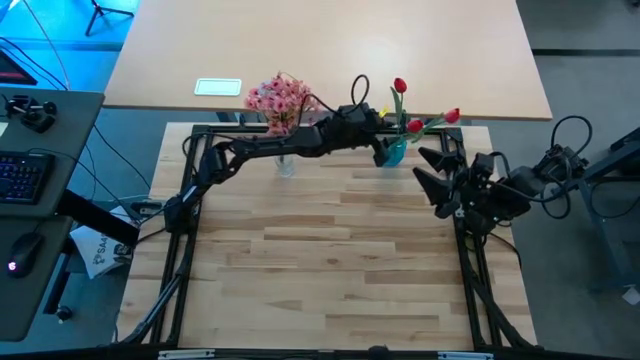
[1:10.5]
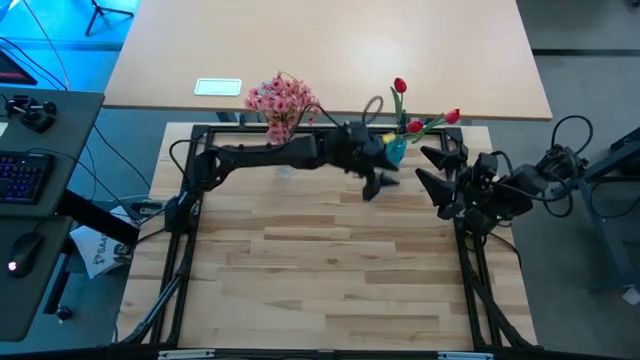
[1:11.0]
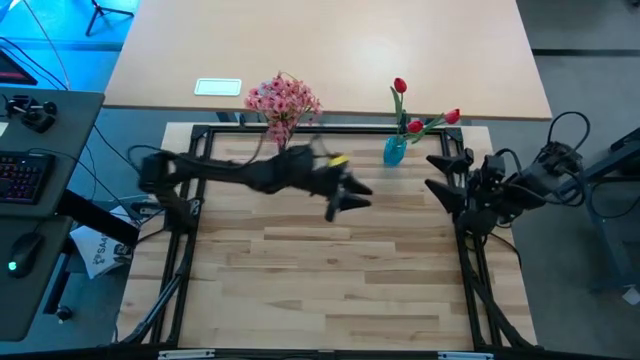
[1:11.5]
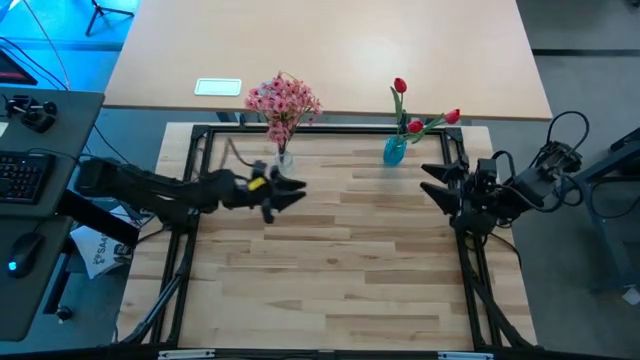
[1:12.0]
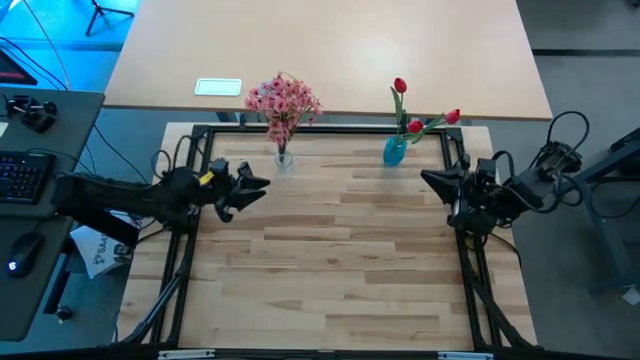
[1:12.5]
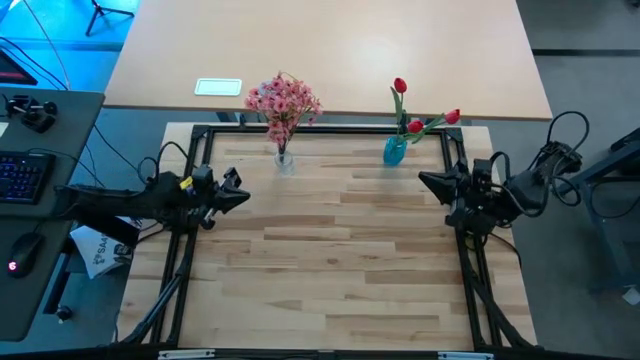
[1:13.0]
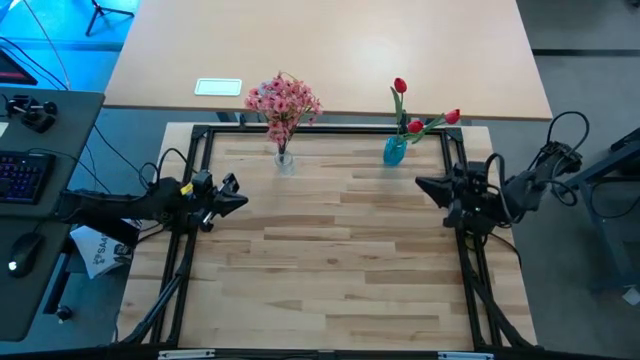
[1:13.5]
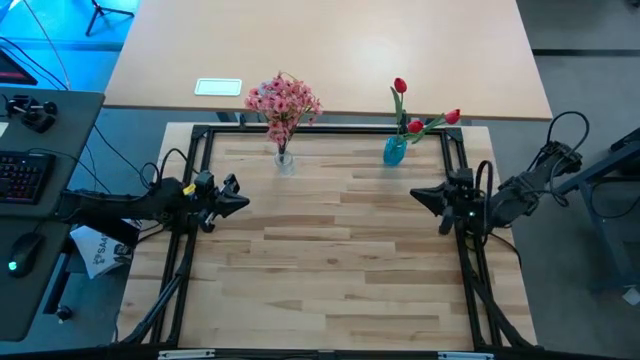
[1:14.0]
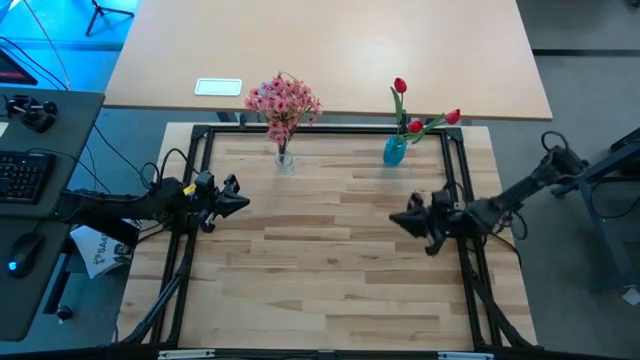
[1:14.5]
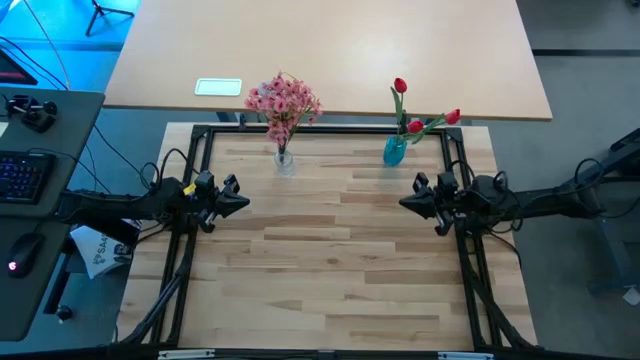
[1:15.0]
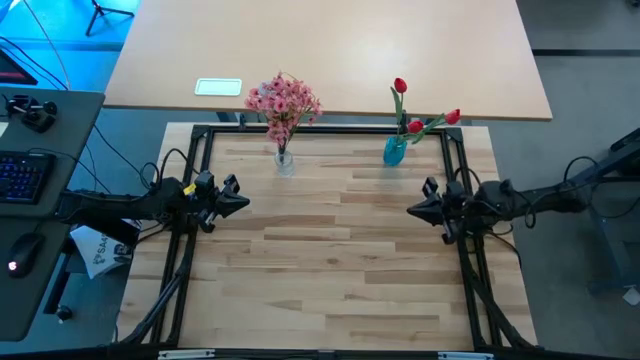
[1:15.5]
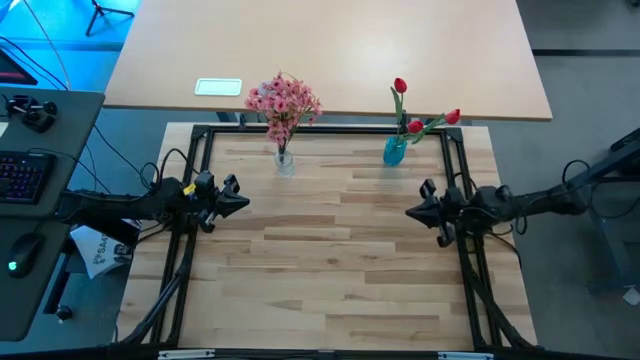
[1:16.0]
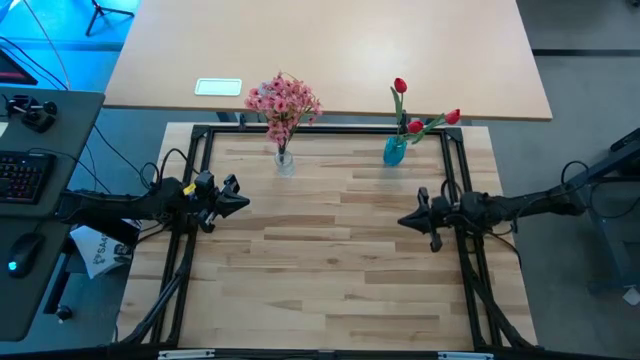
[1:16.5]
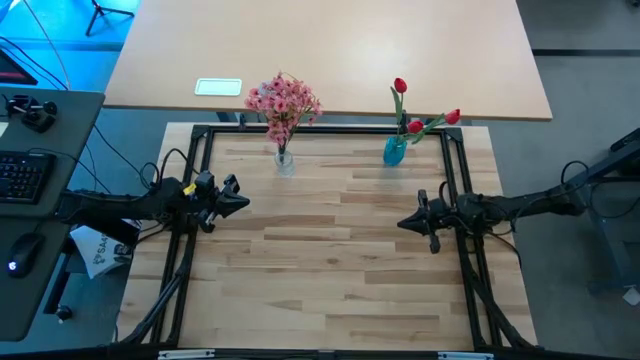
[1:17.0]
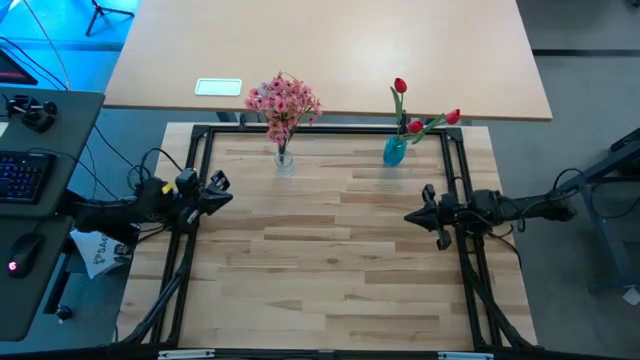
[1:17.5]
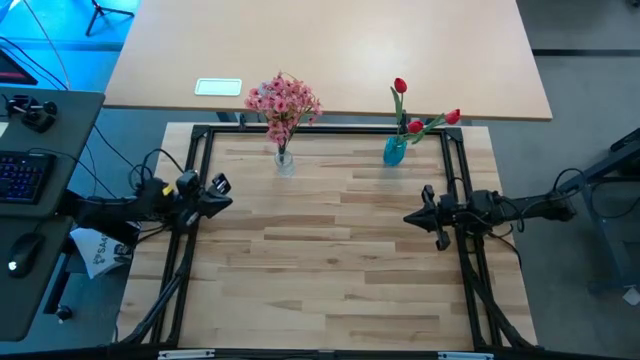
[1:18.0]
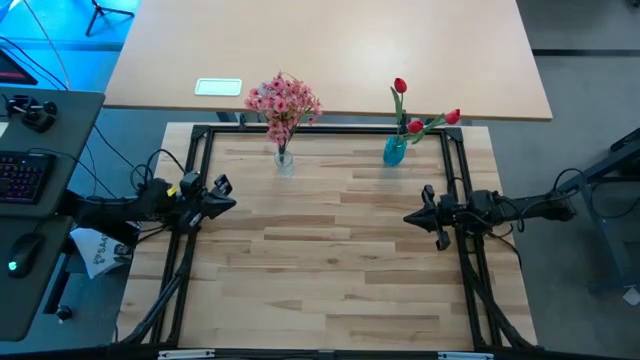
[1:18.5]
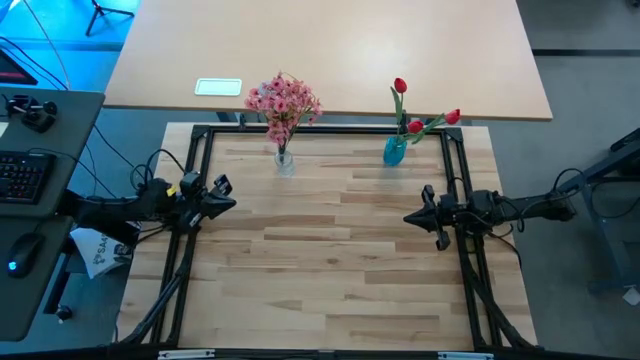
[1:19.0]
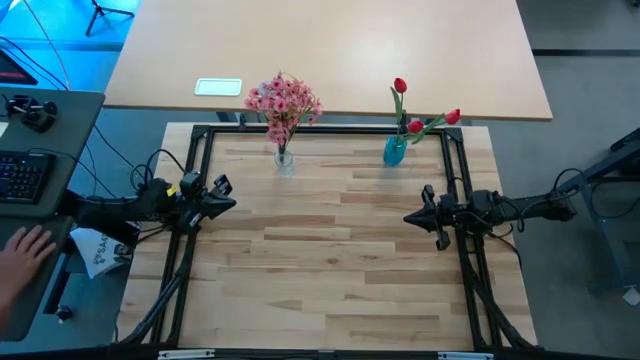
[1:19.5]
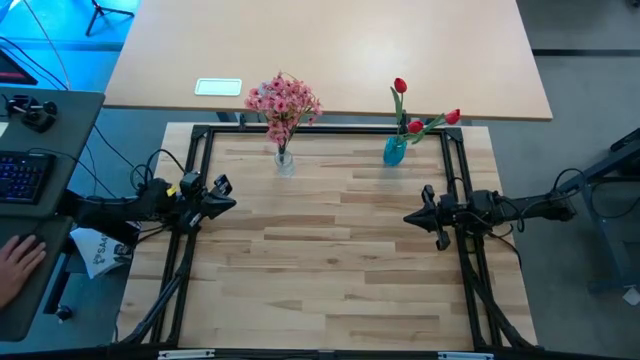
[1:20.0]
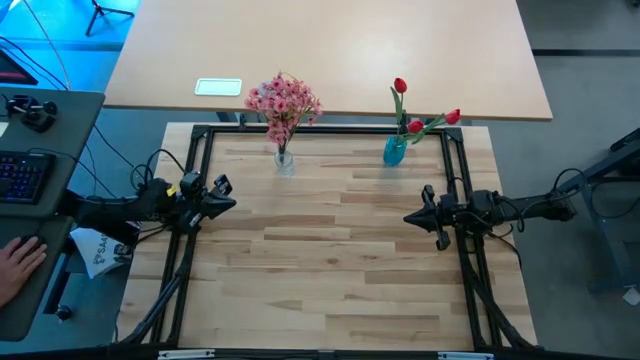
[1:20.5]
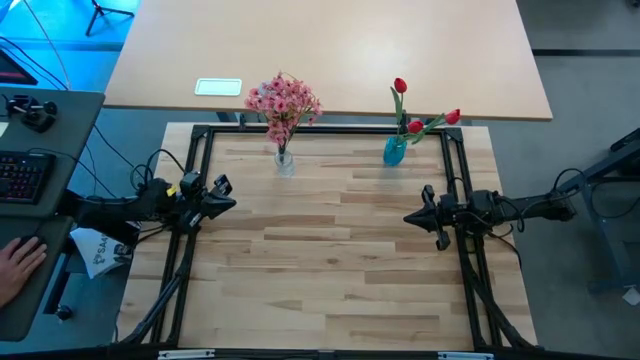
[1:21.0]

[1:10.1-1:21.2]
Task: Sort flowers into vase by color
Return to Home Position

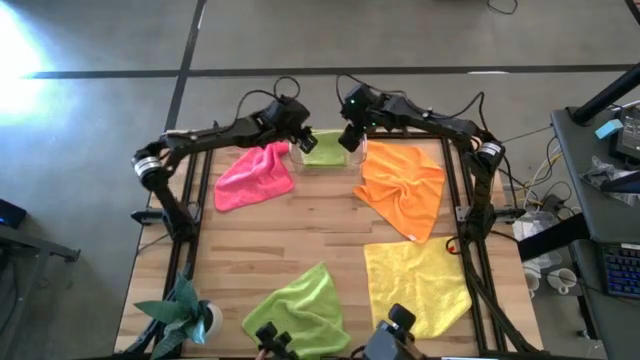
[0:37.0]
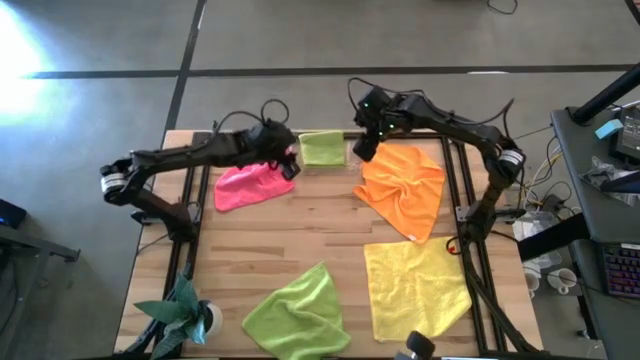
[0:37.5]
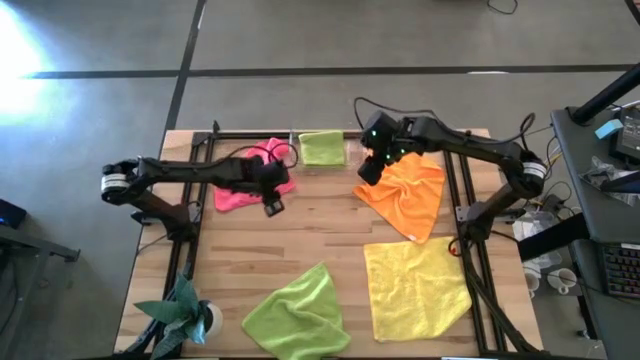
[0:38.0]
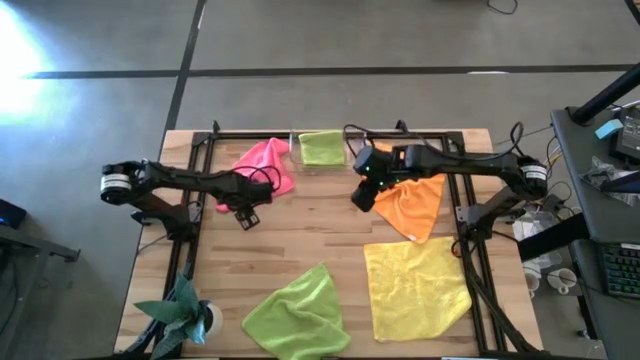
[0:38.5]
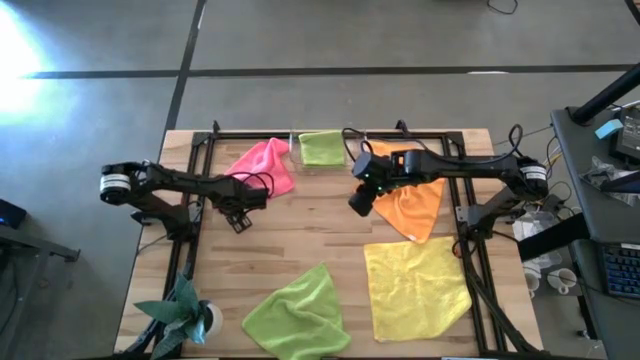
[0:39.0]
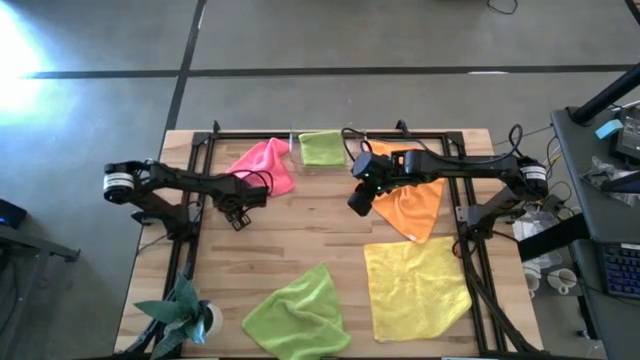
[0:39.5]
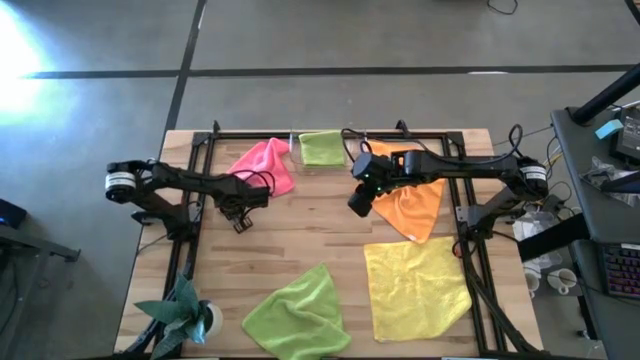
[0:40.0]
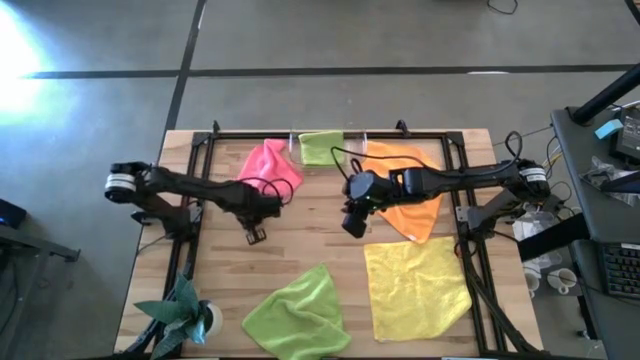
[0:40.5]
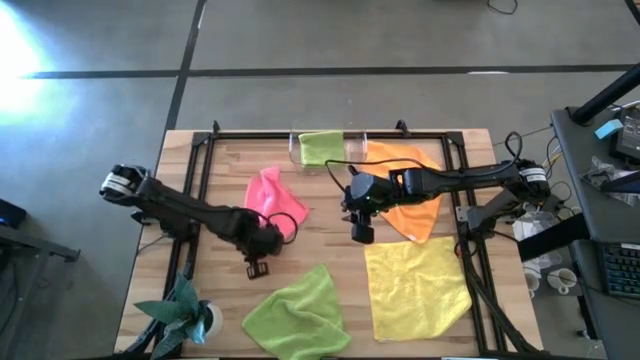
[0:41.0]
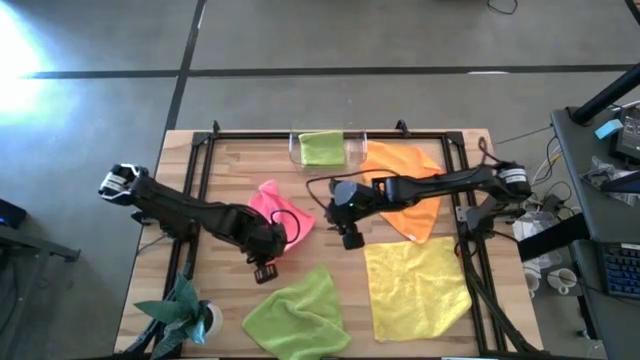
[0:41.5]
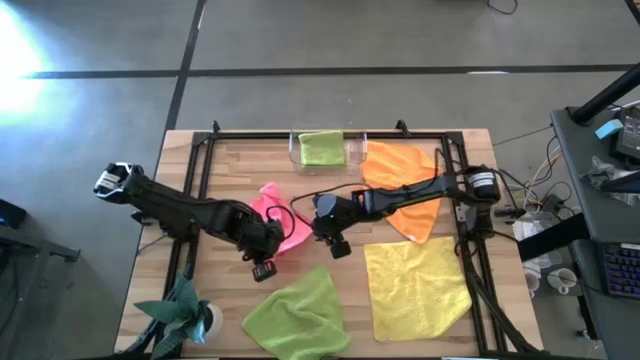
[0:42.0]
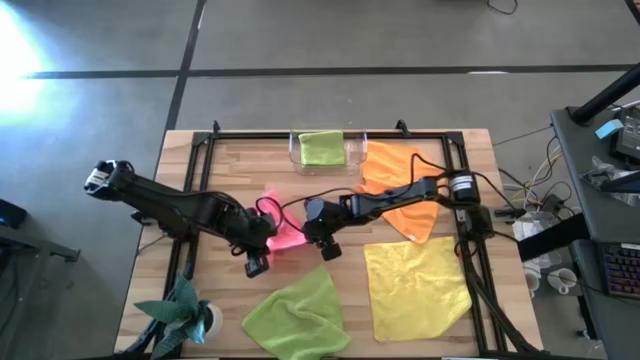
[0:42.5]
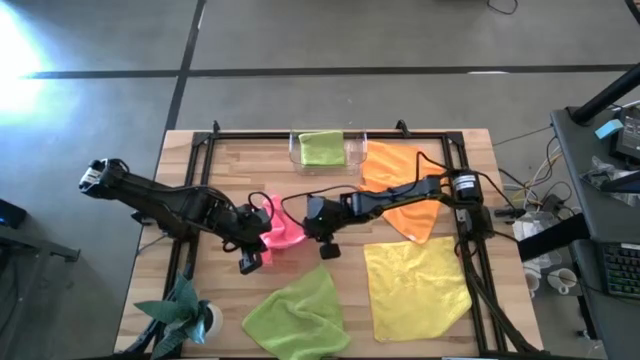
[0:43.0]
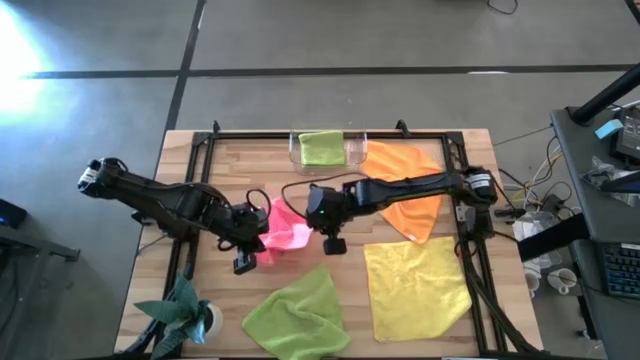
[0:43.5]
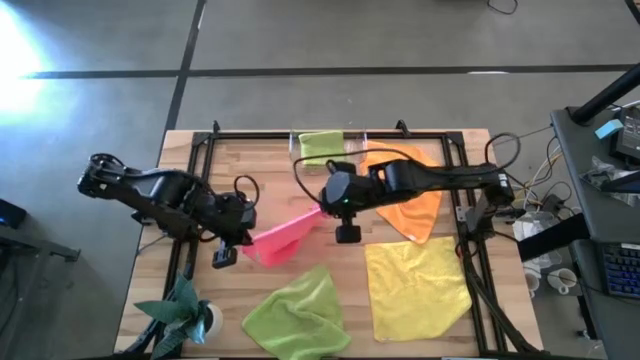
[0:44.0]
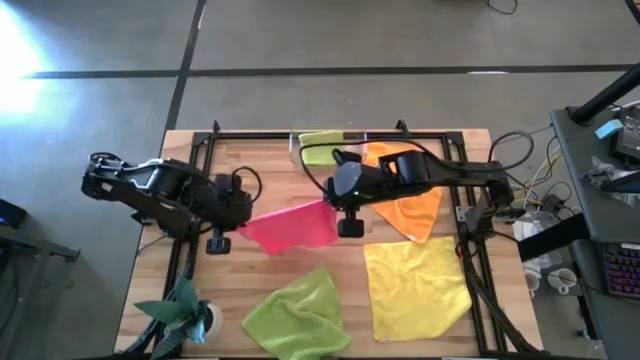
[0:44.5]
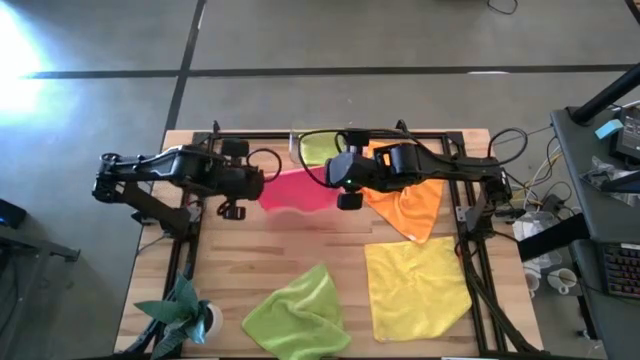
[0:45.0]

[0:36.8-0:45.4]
Task: Fold microfiber towels
Fold the pink microfiber towel

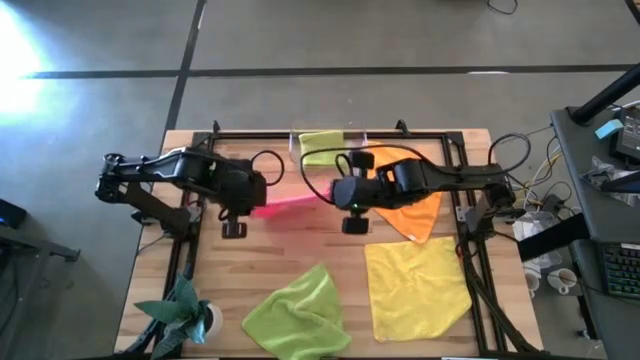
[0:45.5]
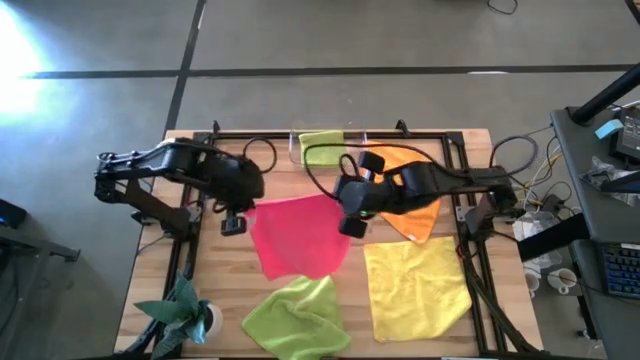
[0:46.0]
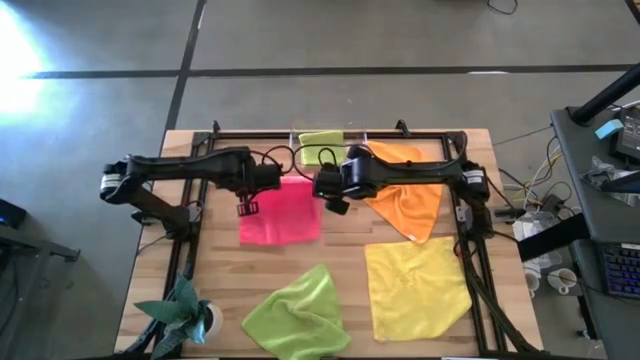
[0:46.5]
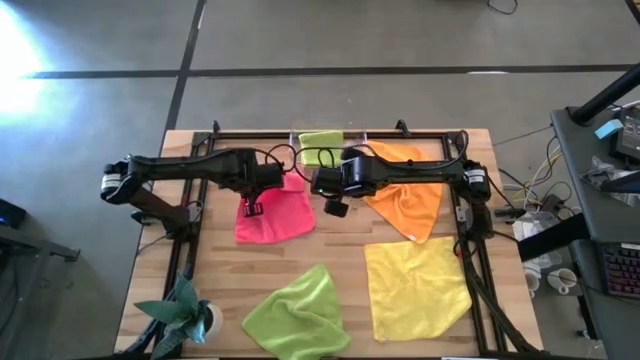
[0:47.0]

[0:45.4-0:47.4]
Fold the pink microfiber towel
